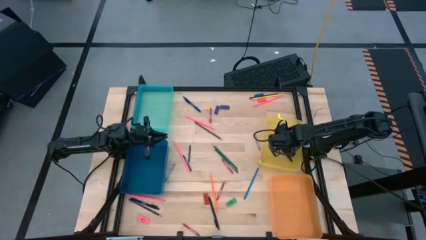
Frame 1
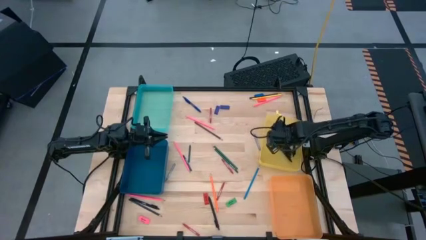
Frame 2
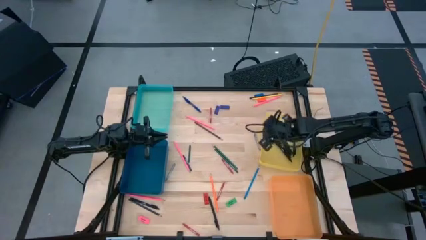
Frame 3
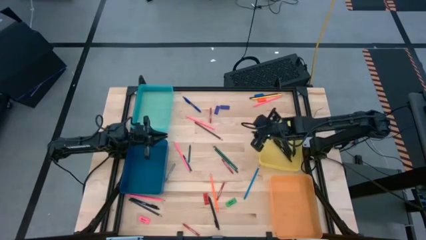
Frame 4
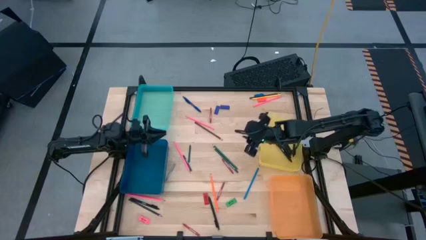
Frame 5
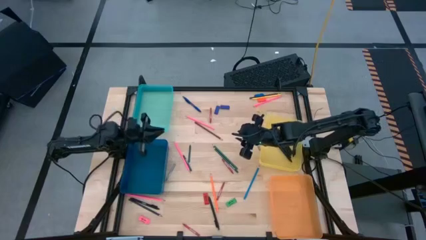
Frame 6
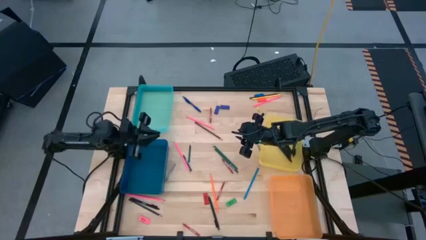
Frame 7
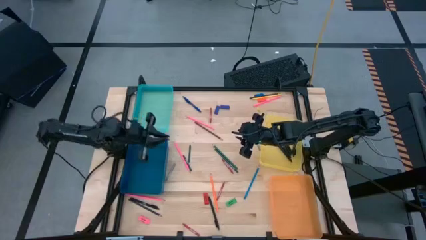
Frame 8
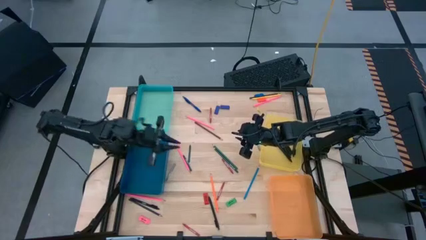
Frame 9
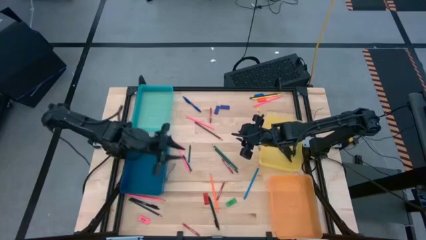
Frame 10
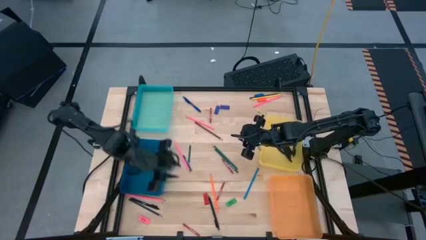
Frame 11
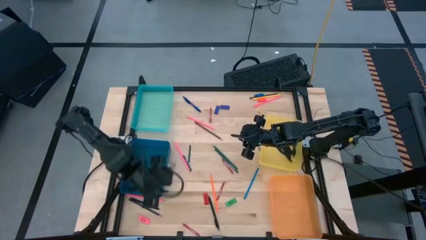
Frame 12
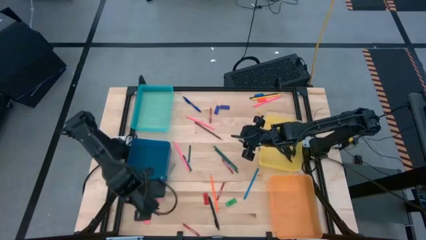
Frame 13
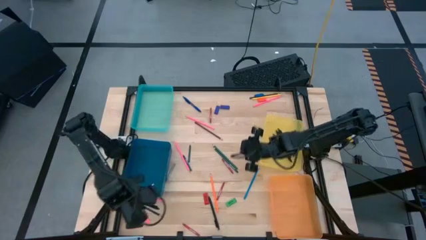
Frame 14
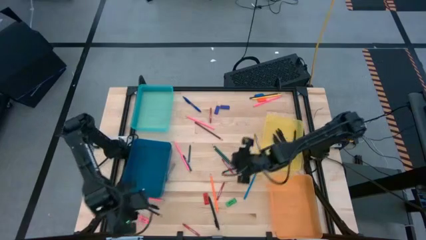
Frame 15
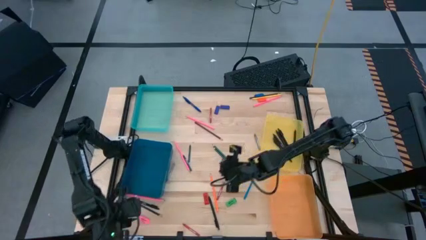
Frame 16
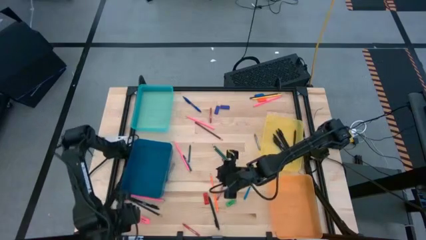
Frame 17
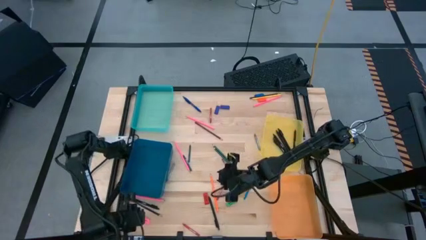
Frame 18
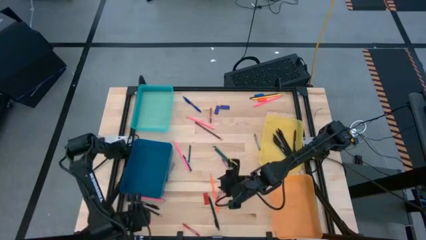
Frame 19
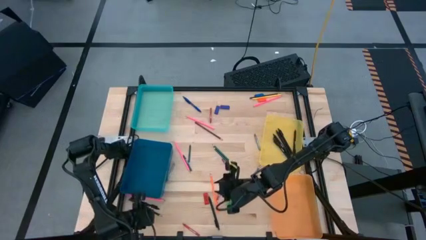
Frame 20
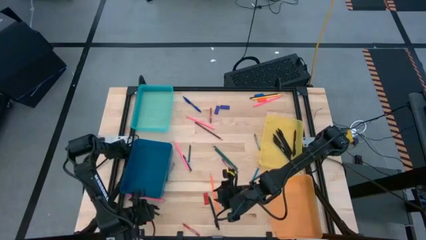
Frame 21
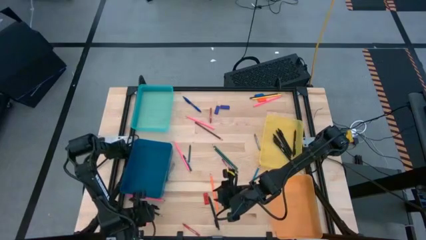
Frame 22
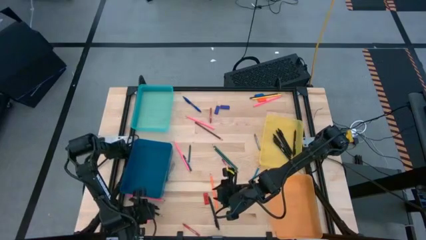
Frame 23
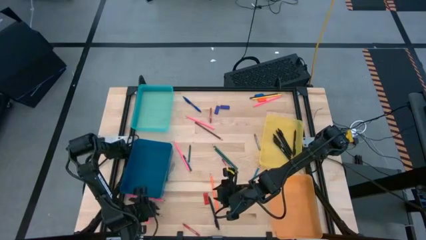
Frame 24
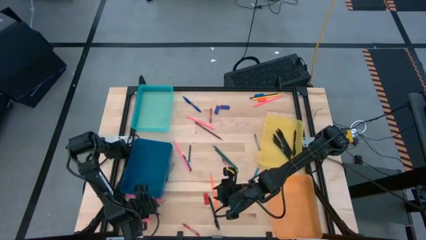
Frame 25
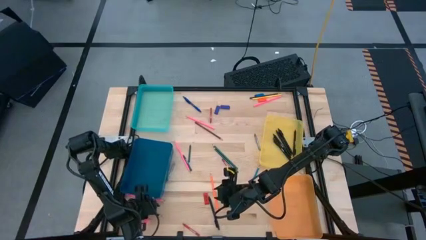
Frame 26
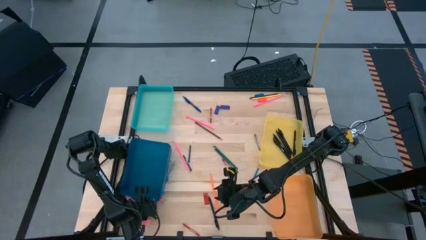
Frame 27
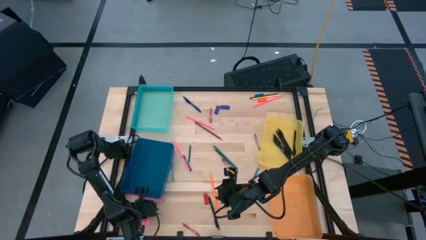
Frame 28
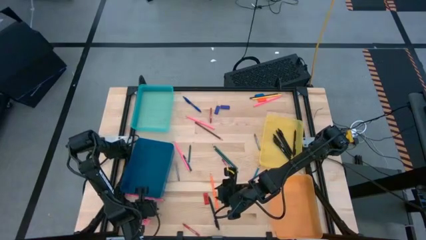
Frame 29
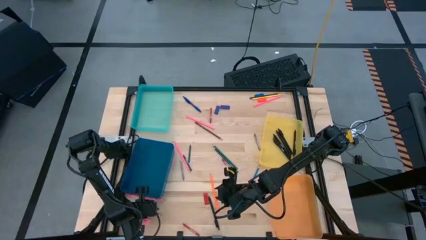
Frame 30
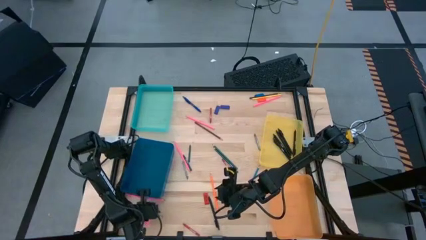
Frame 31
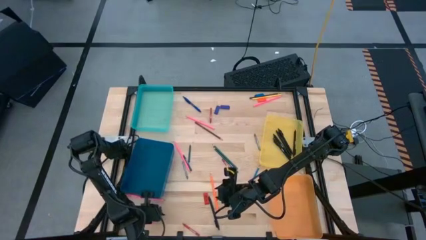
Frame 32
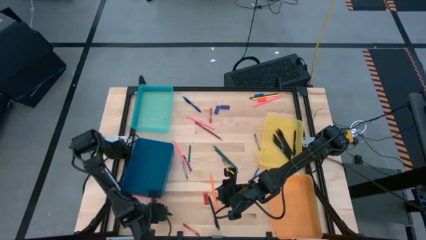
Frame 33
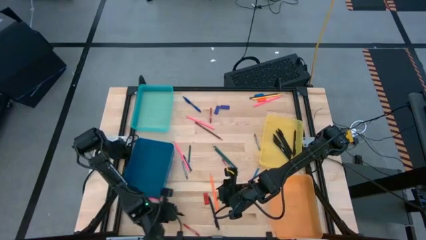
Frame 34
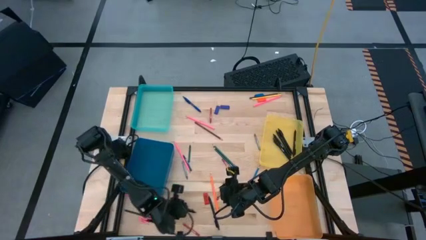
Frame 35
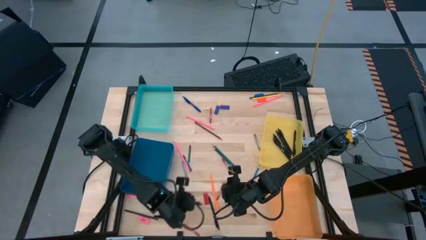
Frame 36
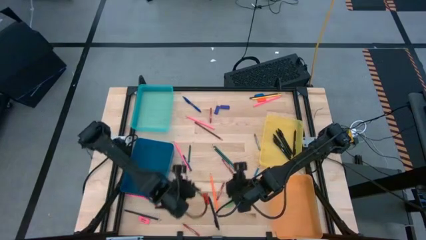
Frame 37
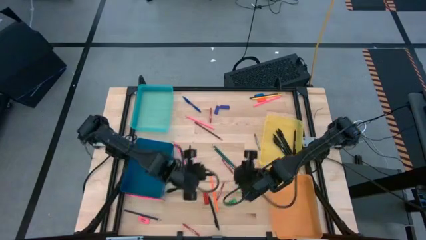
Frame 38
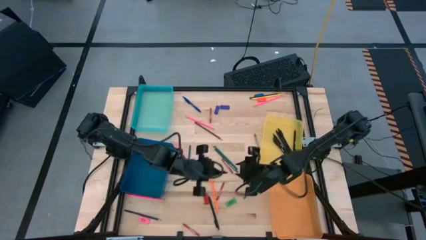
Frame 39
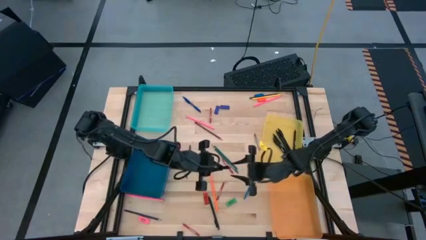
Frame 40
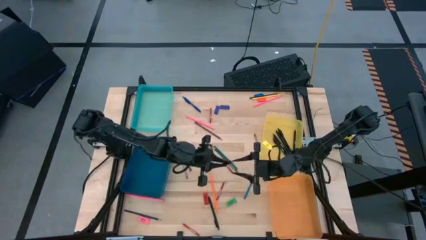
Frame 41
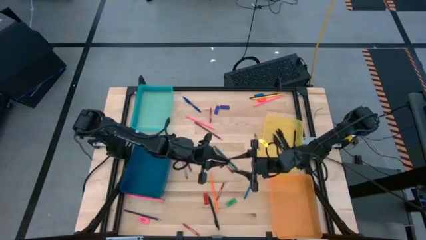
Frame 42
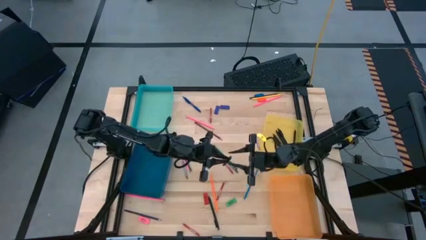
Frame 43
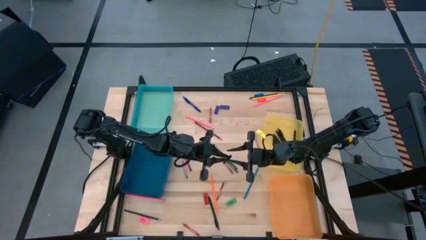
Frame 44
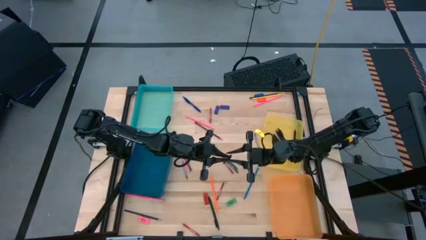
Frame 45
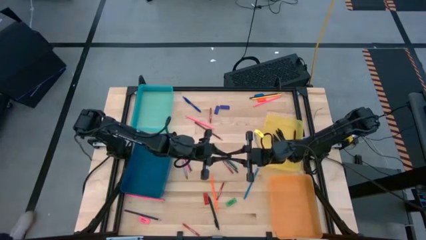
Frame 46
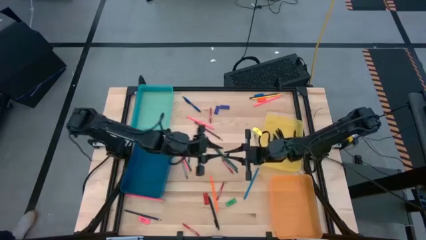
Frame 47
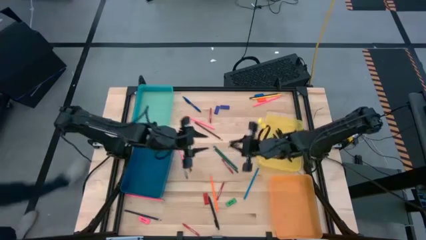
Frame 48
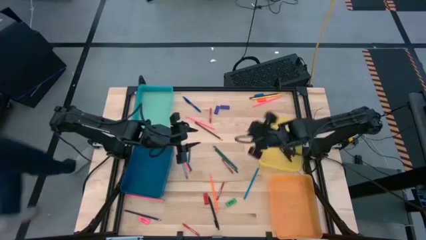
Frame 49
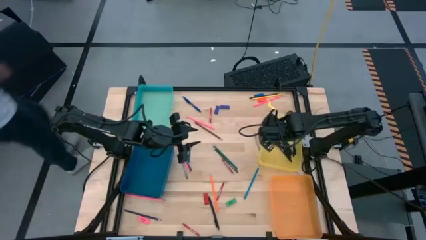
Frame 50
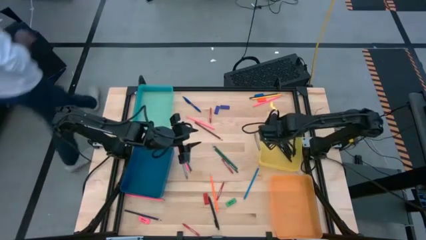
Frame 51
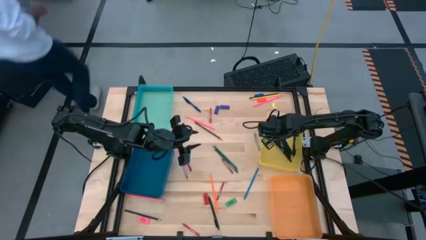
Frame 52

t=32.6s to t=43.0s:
Task: Sort crayons/erasers/pens/pencils in bins
Put the black pen into the yellow bin

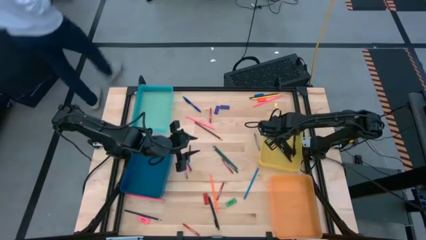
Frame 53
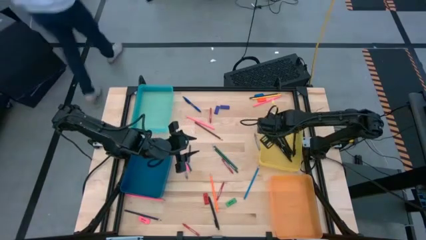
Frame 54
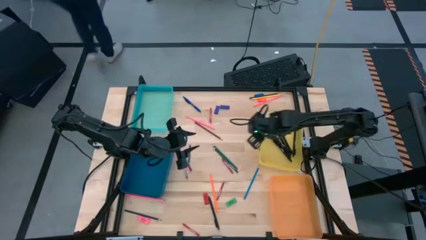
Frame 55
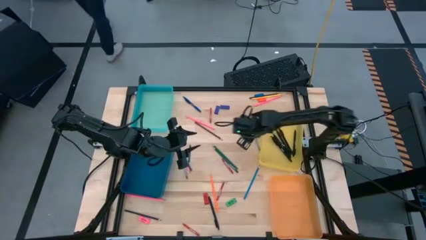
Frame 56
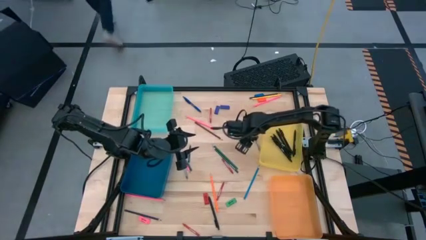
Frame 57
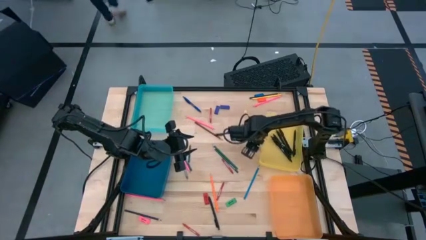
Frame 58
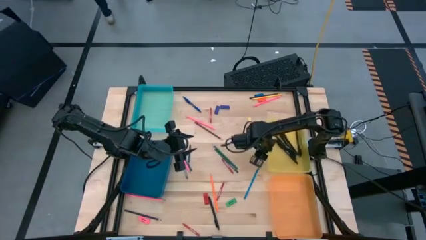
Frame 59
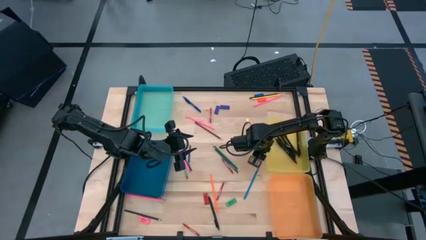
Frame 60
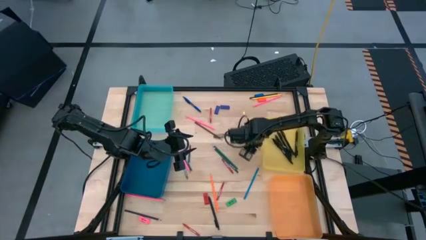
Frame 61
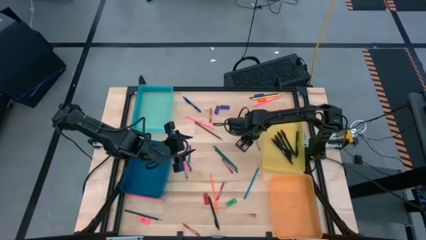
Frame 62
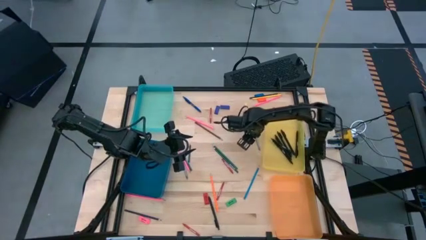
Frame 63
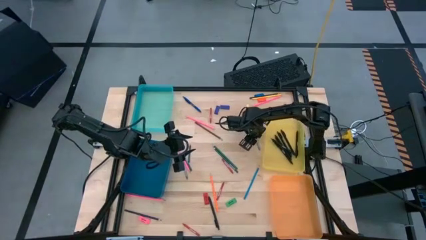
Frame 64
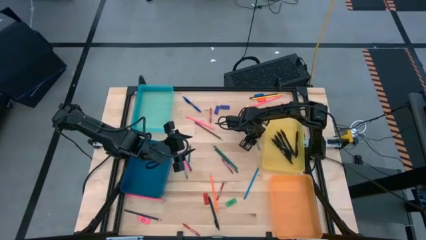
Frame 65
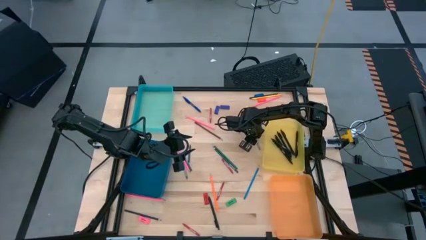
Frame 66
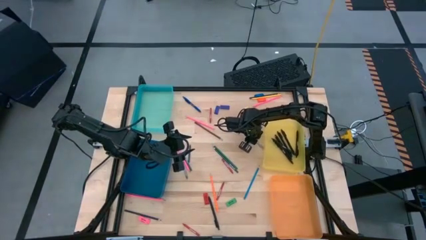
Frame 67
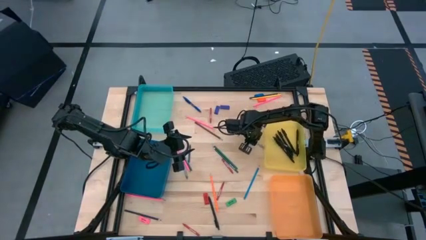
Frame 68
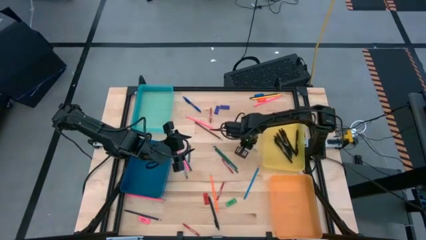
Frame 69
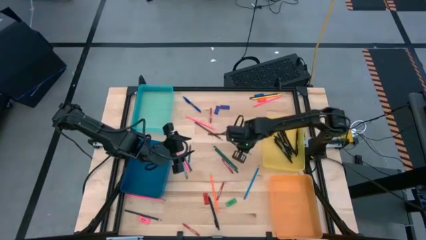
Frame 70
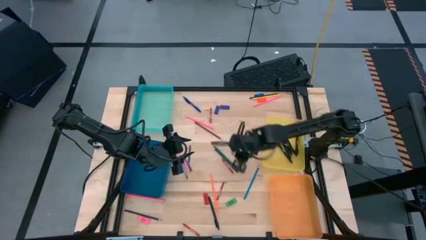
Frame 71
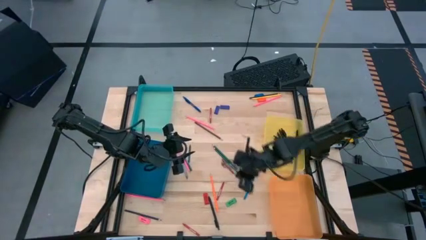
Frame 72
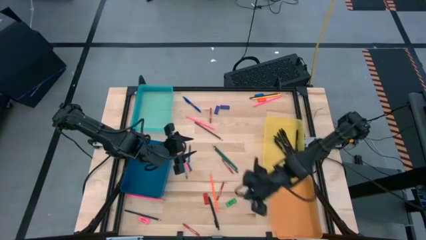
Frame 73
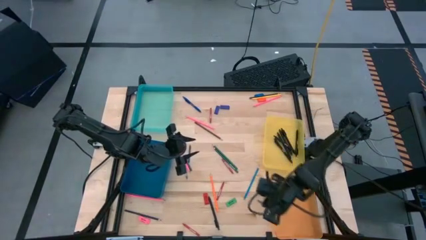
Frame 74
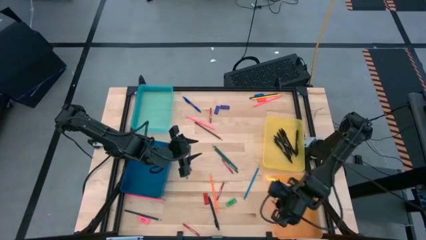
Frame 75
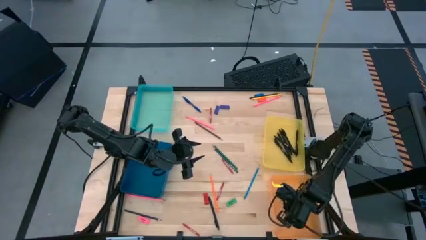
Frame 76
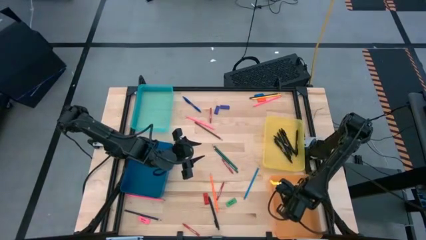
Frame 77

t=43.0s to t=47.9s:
Put the gray crayon into the orange bin

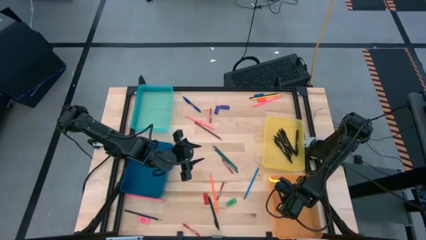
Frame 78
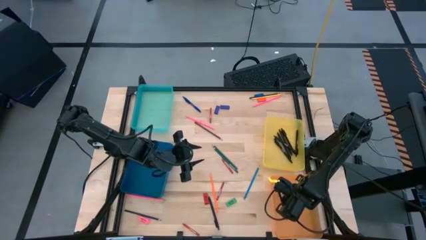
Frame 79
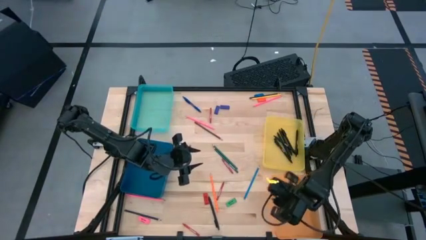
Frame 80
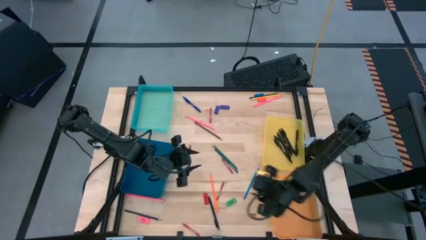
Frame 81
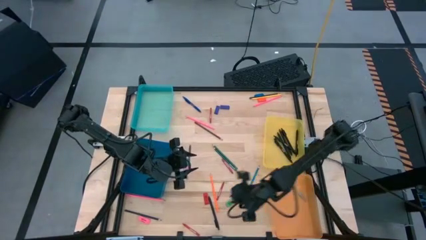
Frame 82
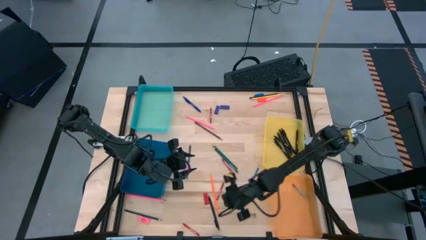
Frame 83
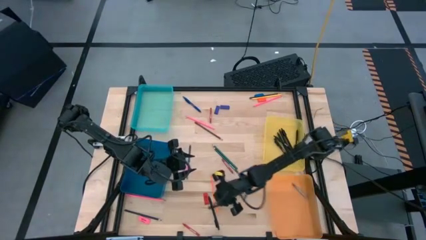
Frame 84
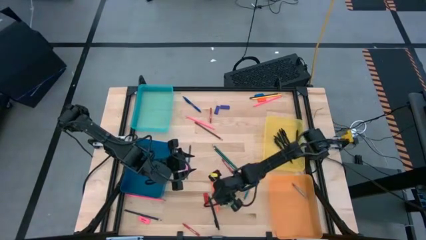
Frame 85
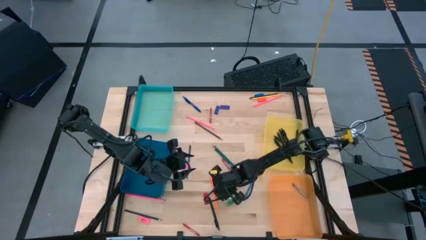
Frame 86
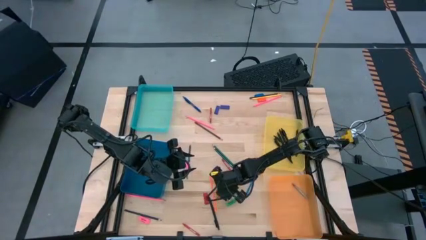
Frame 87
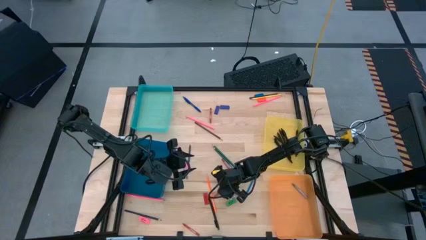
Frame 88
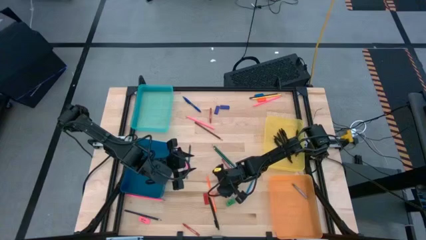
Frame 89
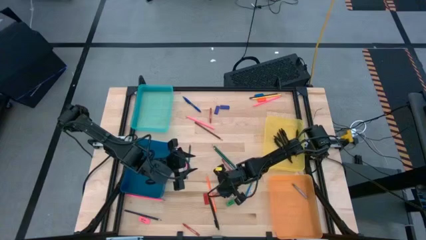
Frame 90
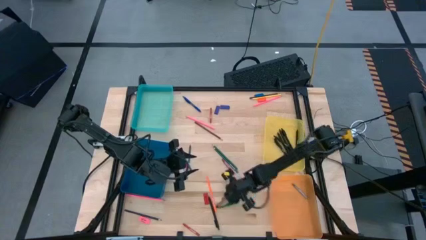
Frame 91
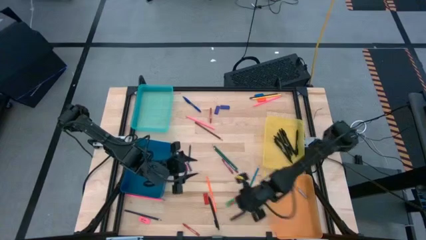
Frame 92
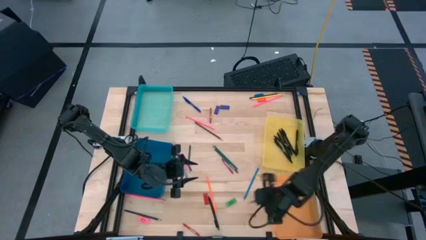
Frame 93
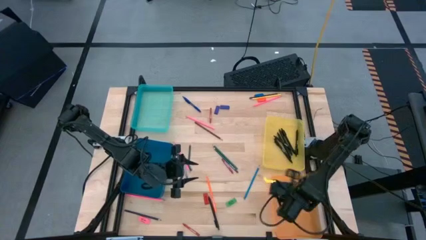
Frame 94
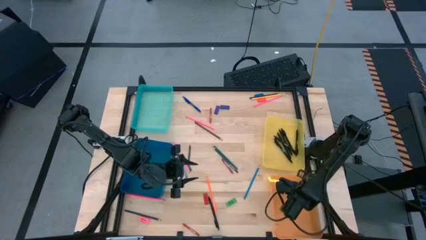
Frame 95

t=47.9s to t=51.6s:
Put the red crayon into the orange bin
